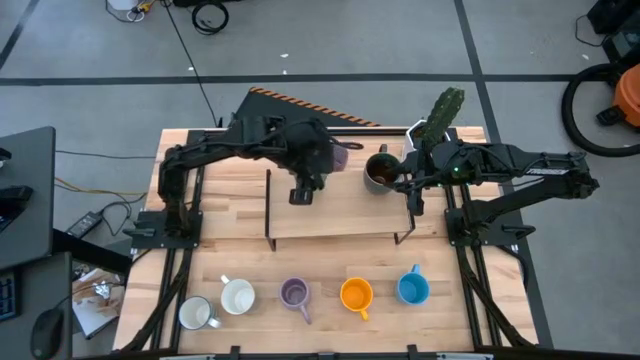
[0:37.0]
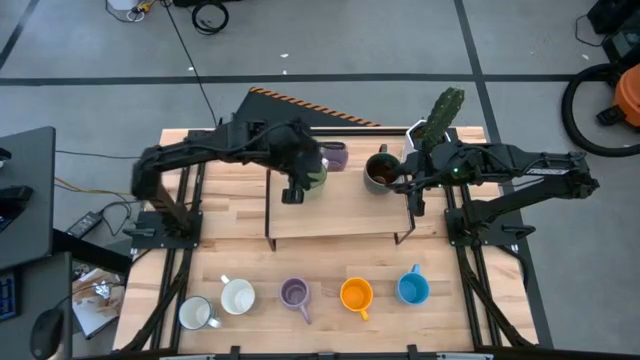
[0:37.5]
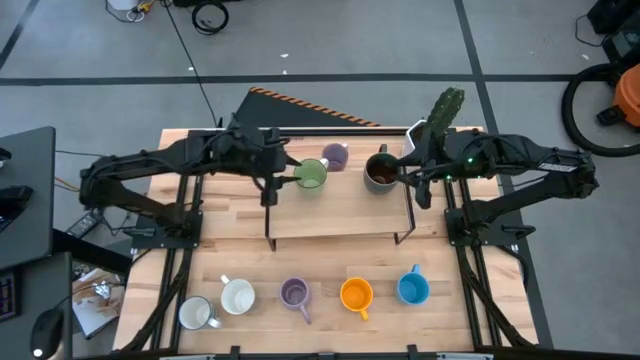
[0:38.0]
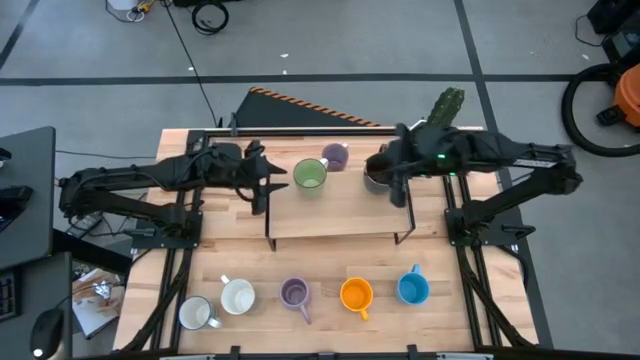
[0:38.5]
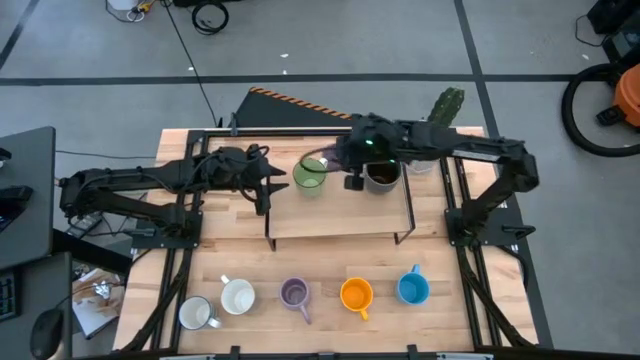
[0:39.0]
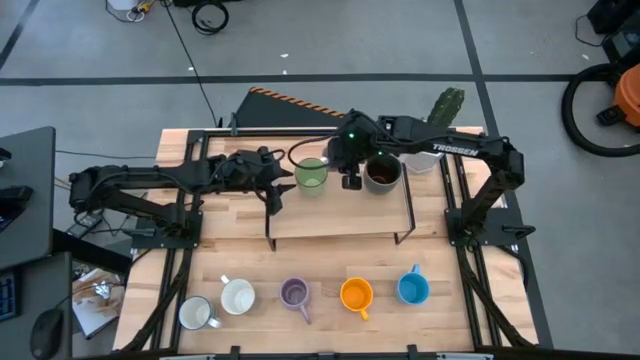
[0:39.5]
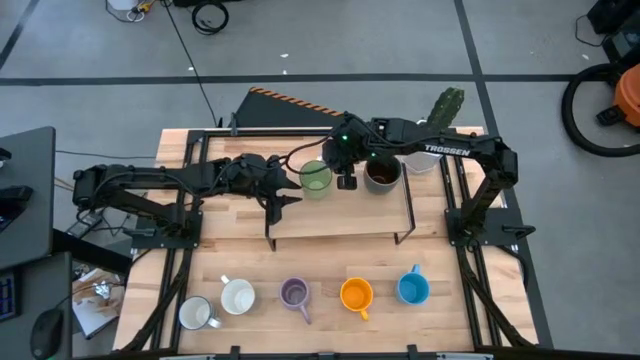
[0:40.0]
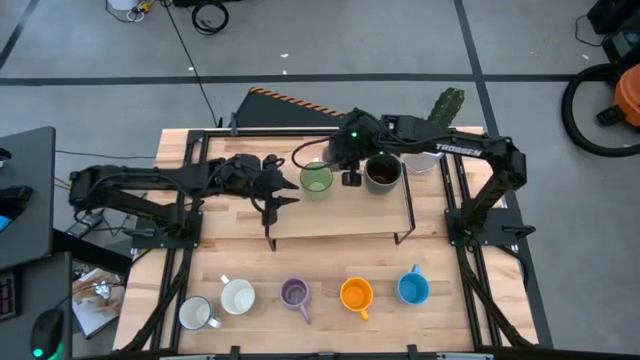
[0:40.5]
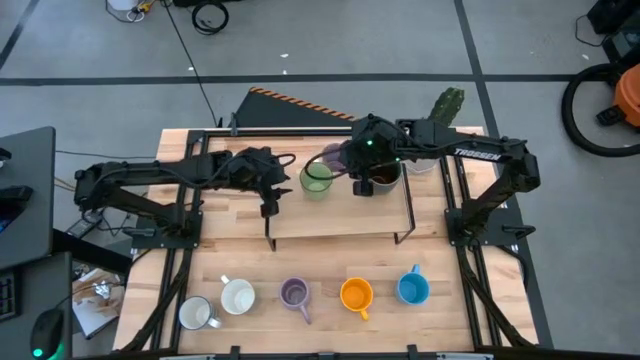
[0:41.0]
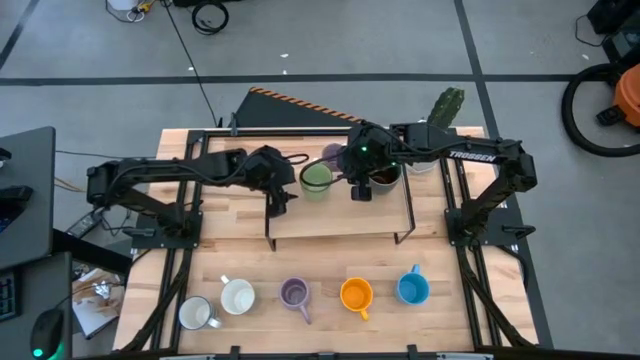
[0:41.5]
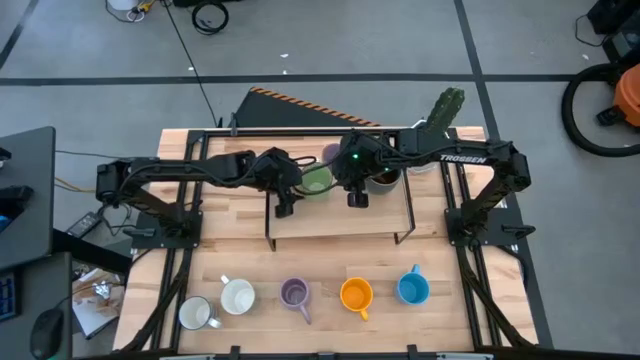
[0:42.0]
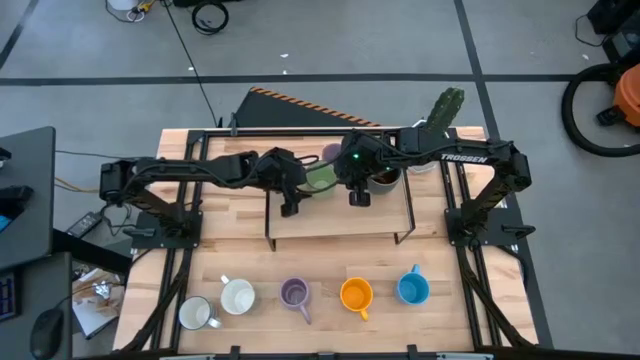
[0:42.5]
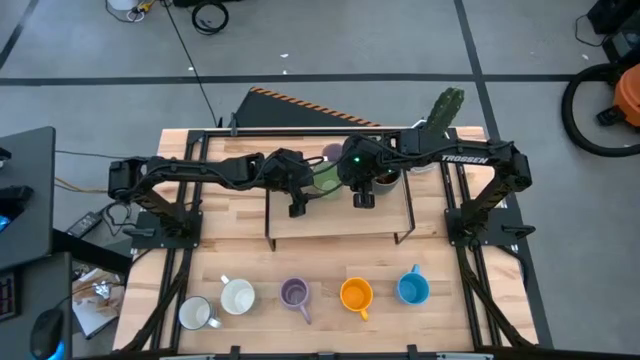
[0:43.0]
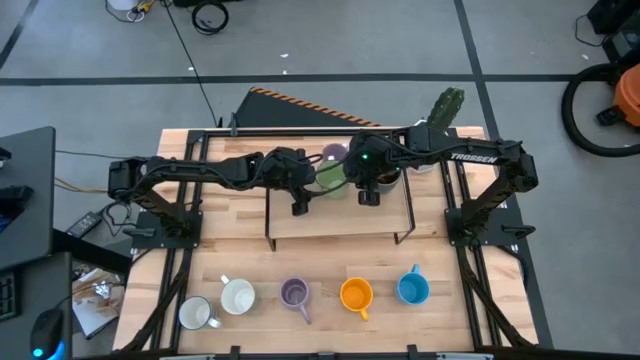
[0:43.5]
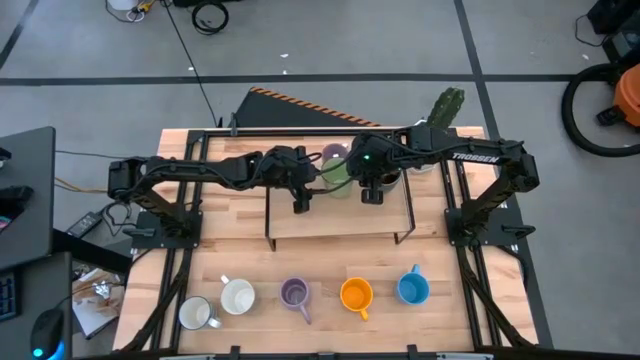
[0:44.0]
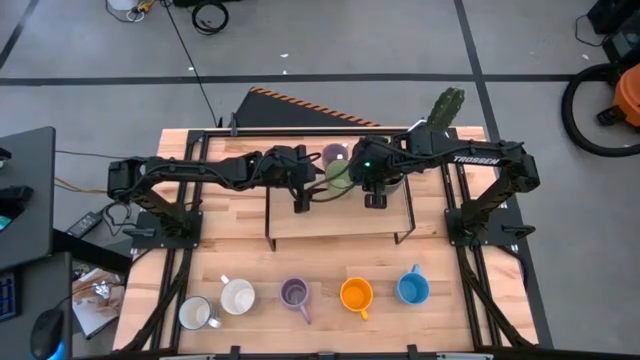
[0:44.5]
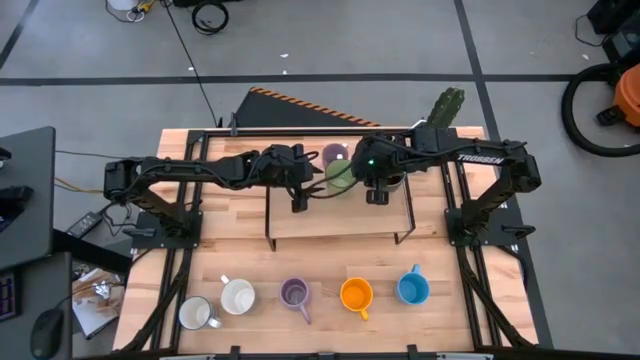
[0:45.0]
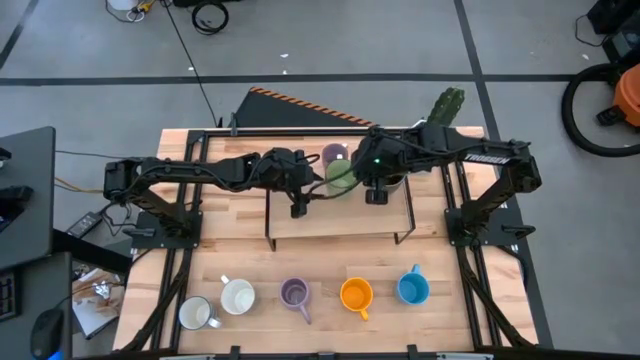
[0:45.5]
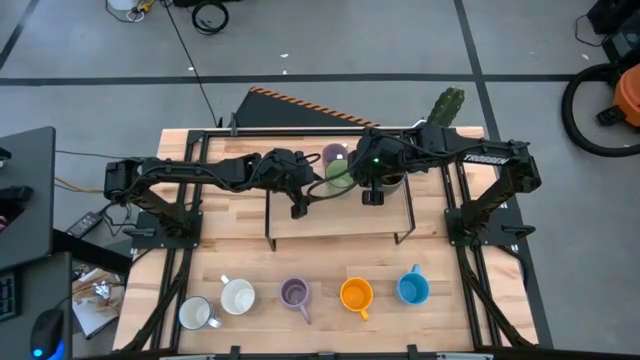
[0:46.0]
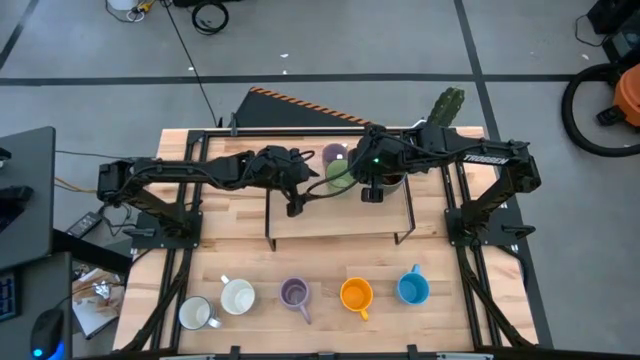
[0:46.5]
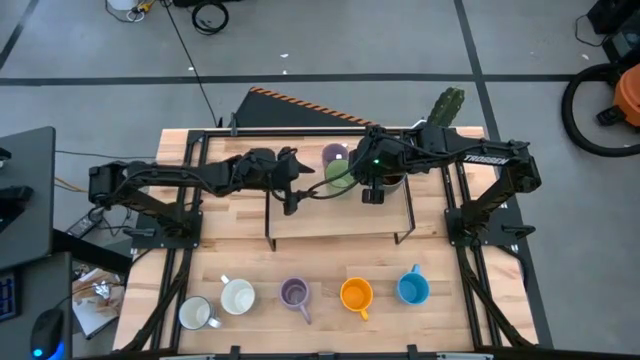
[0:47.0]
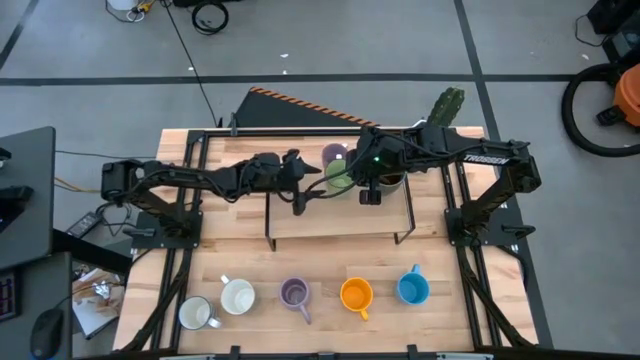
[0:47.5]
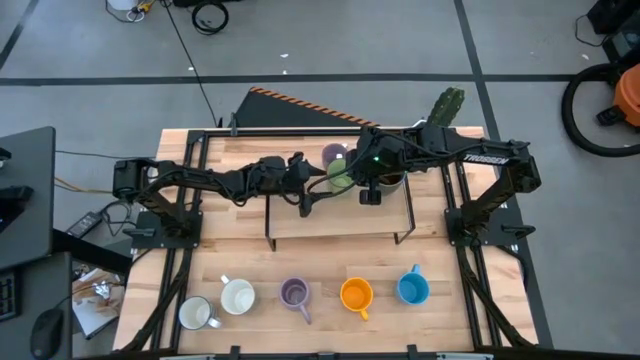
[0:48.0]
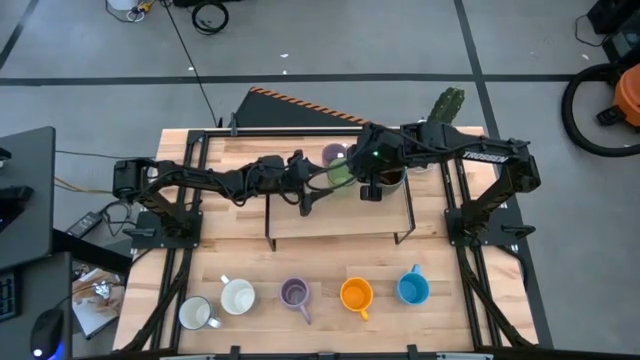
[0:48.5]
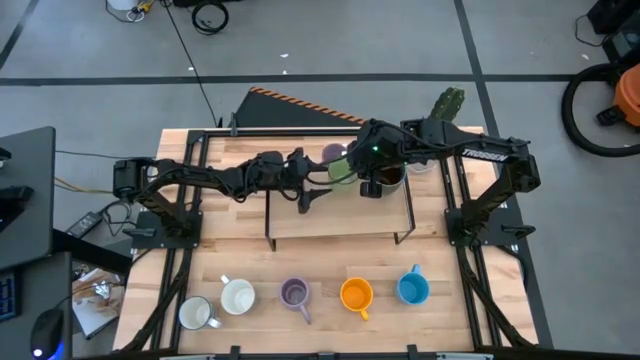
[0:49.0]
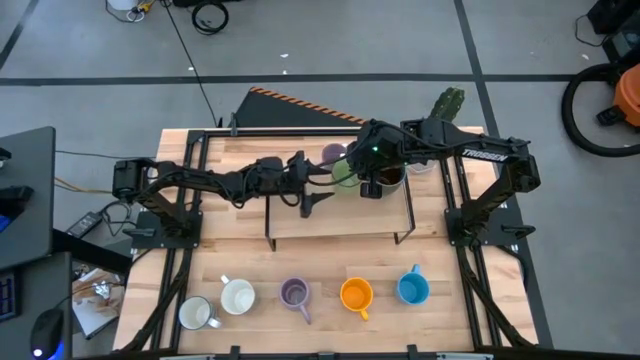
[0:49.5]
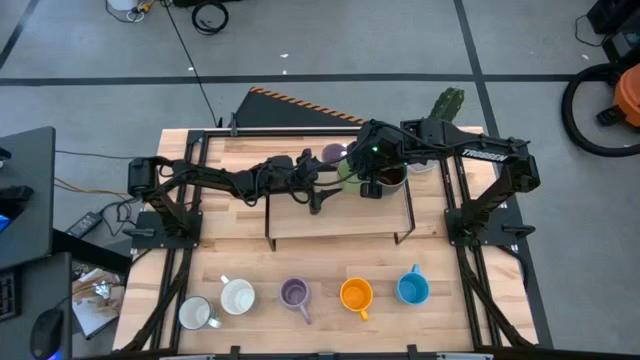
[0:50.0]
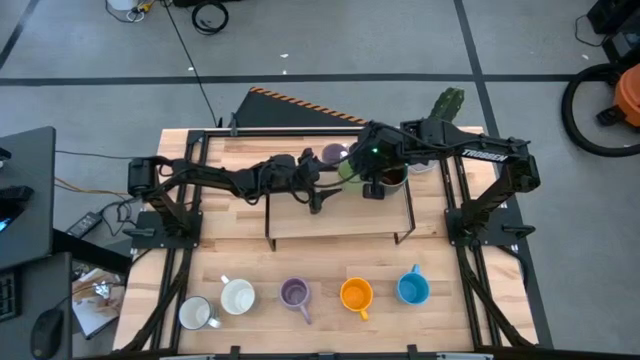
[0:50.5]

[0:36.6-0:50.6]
Task: Place coffee mugs
Put the green mug on the shelf
